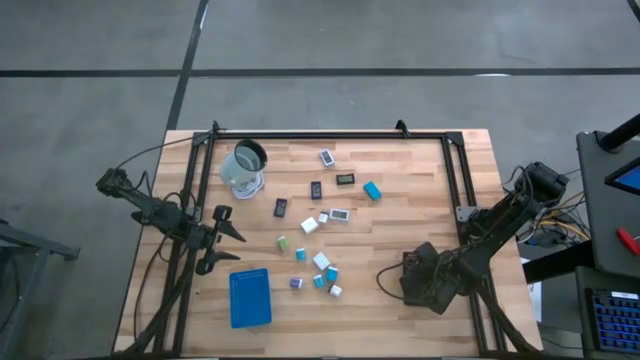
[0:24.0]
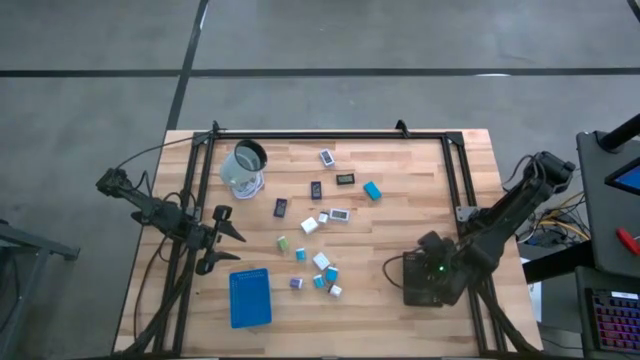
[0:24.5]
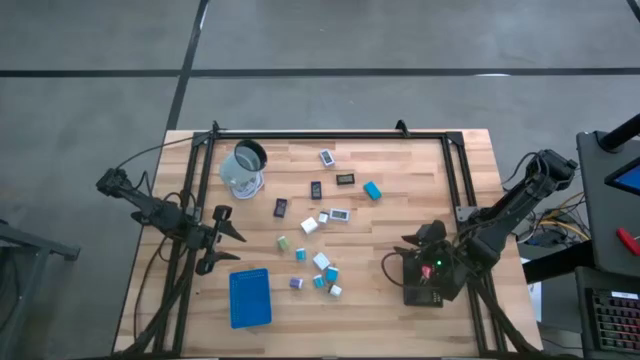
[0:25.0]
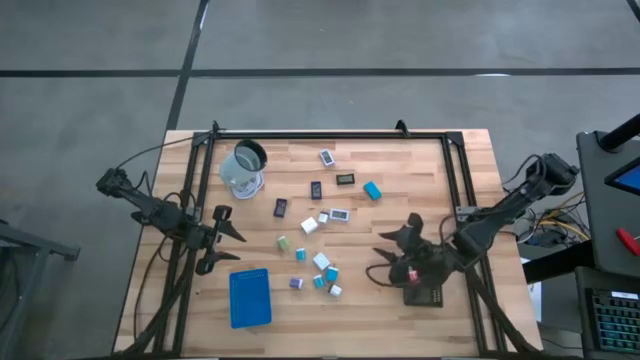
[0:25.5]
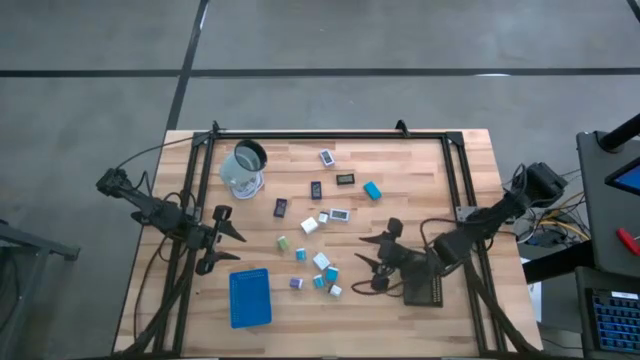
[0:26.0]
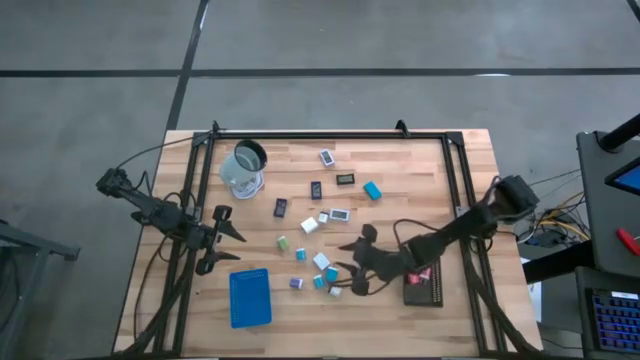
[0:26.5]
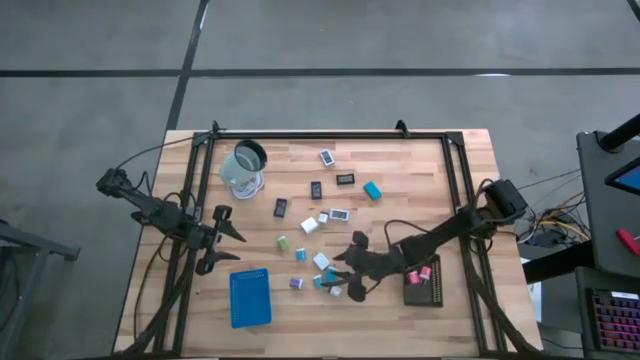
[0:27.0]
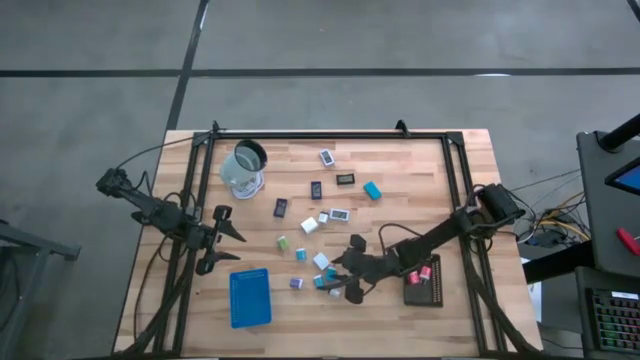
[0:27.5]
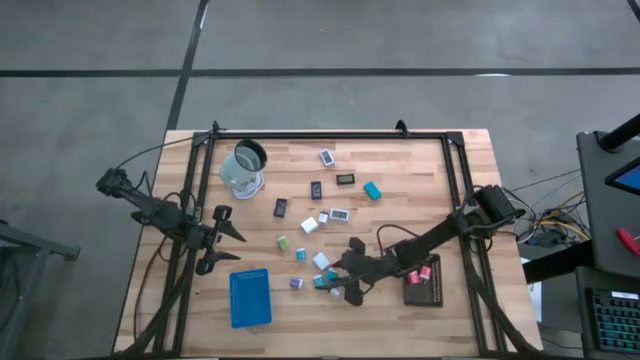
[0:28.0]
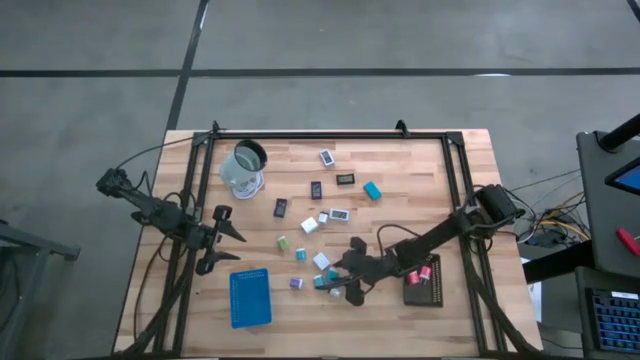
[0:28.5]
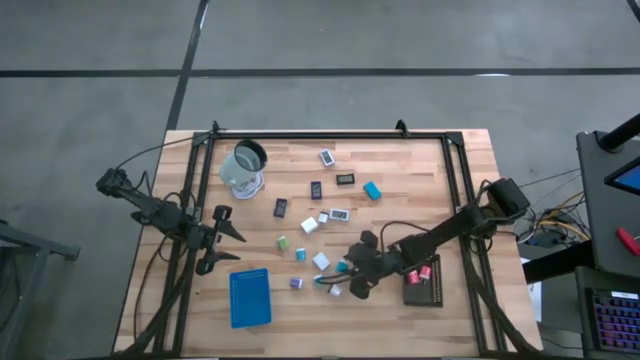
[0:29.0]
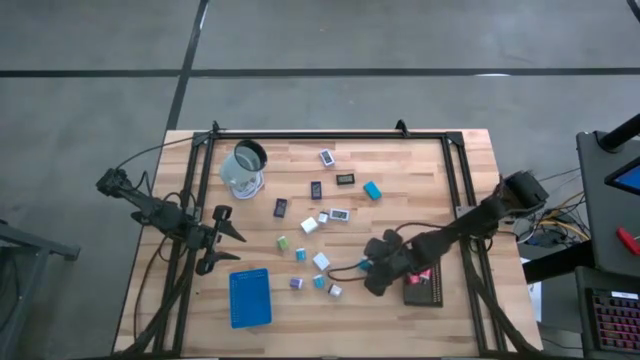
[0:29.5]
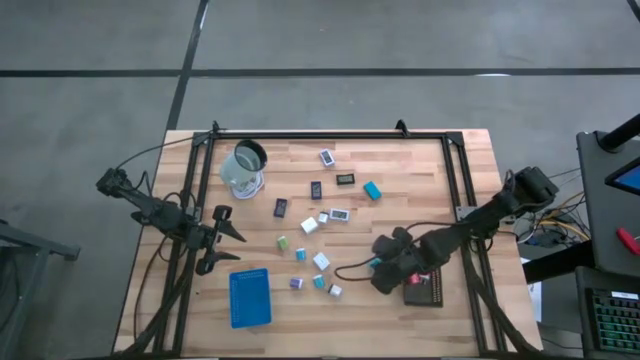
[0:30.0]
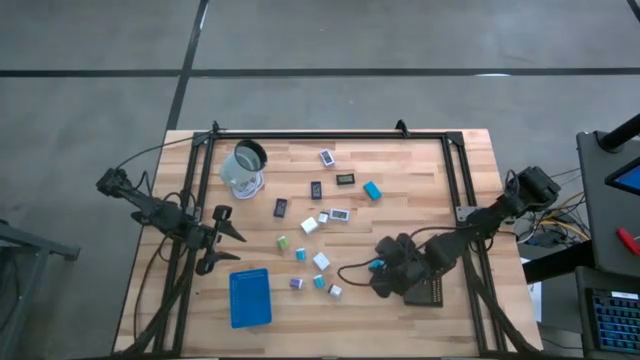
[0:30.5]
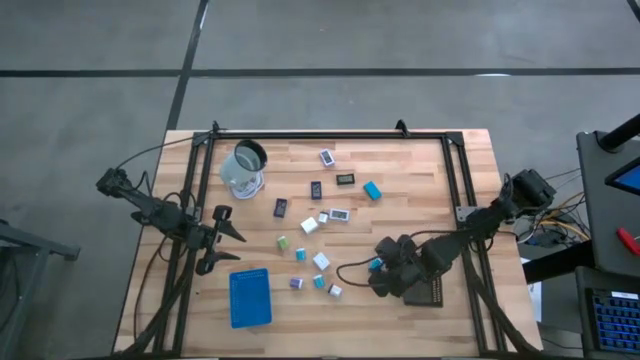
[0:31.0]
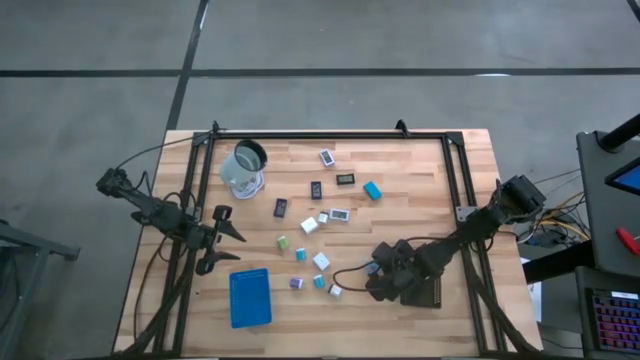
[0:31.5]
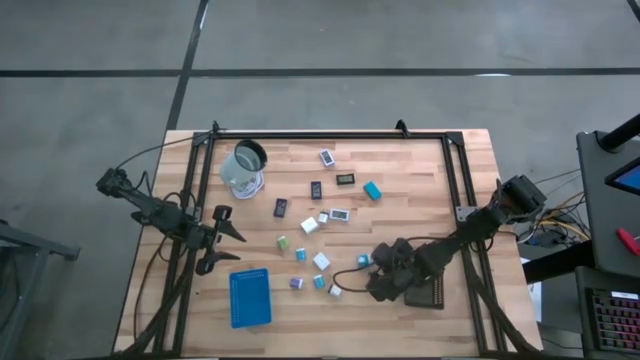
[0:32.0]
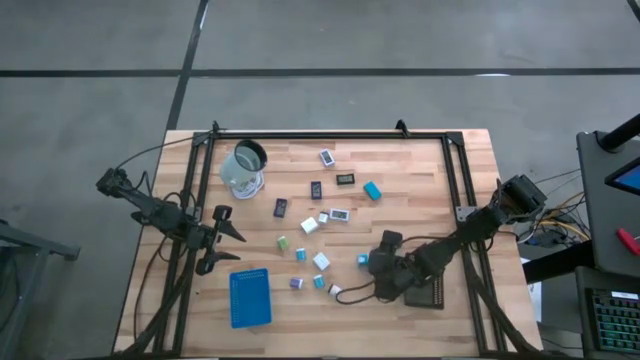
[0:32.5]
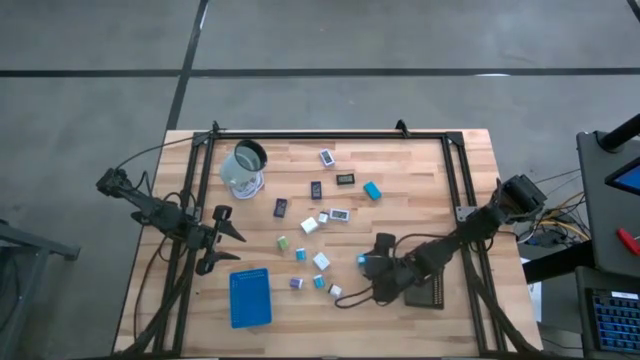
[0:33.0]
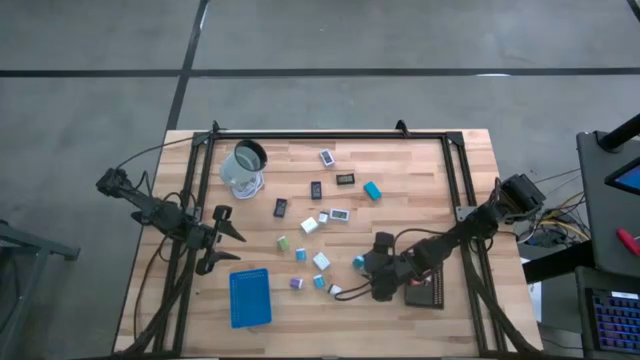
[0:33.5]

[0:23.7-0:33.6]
Task: Pick & Place Office items
Put the bottom right light blue charger adapter into the black bin

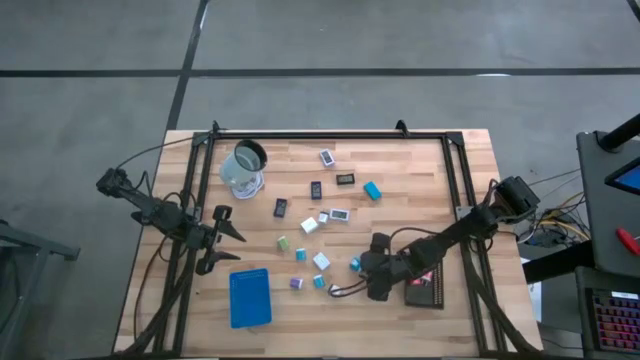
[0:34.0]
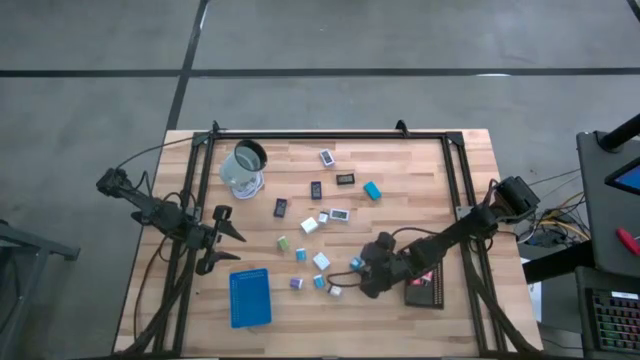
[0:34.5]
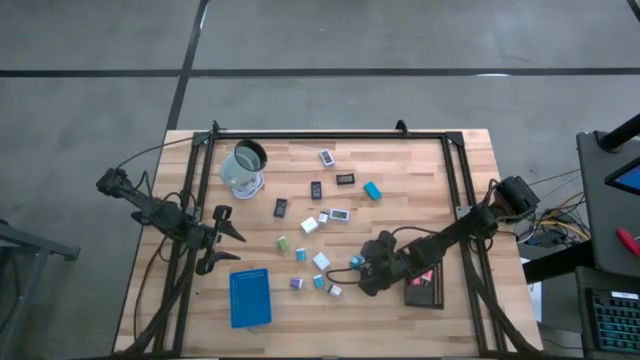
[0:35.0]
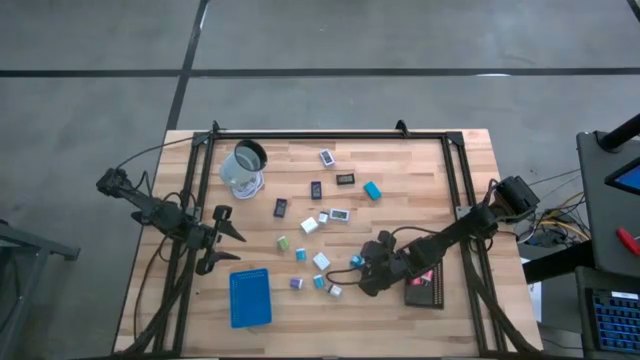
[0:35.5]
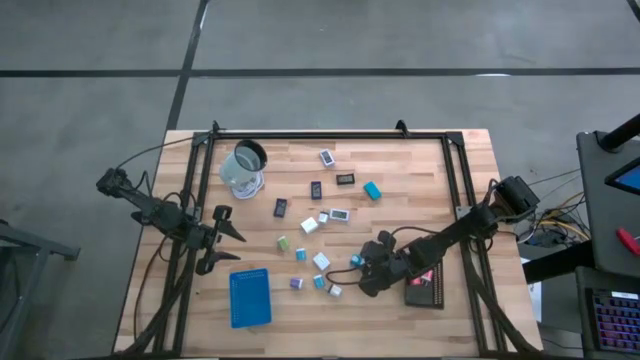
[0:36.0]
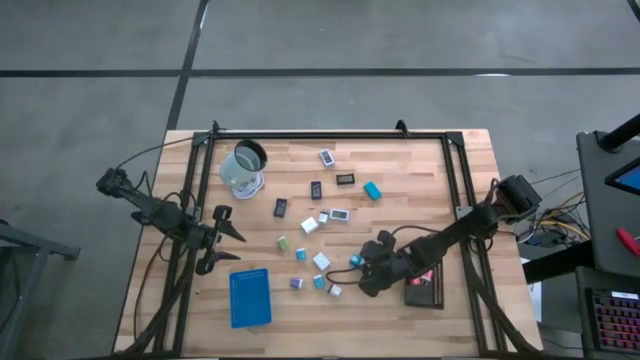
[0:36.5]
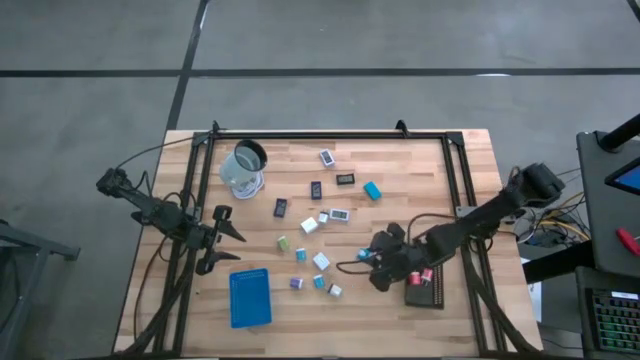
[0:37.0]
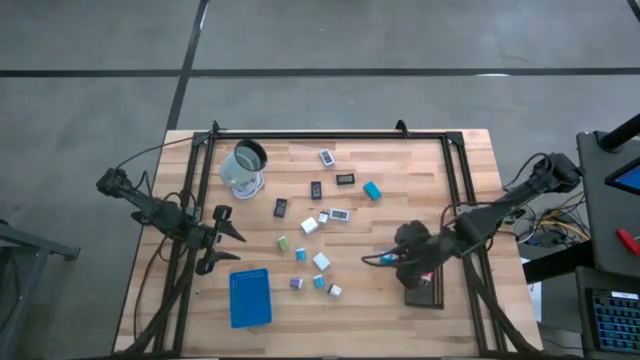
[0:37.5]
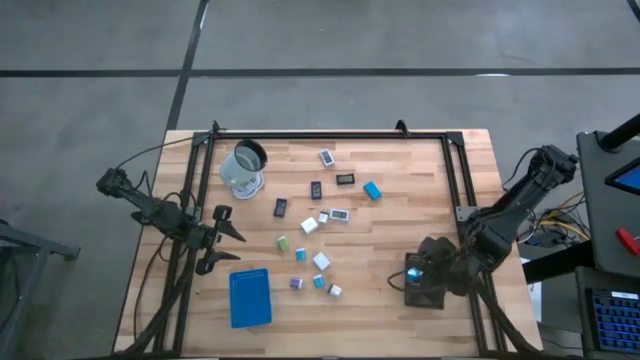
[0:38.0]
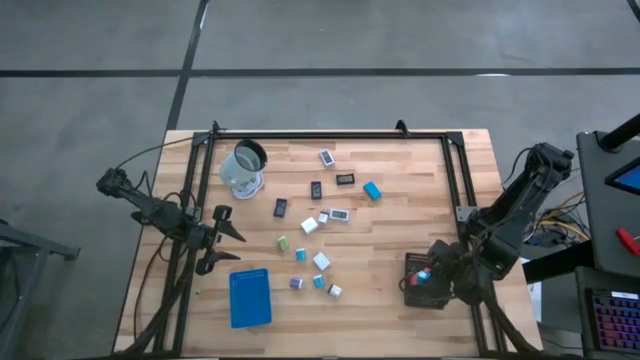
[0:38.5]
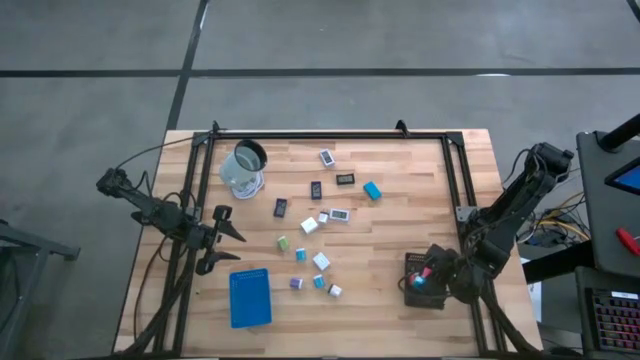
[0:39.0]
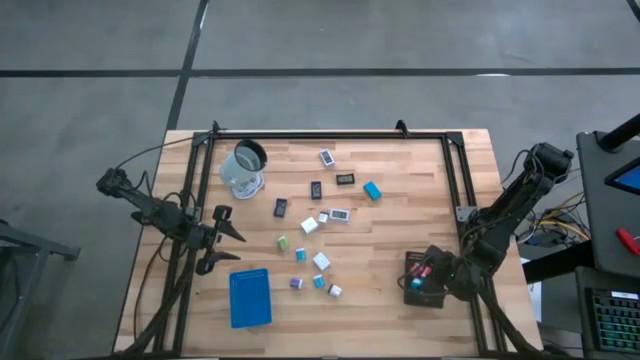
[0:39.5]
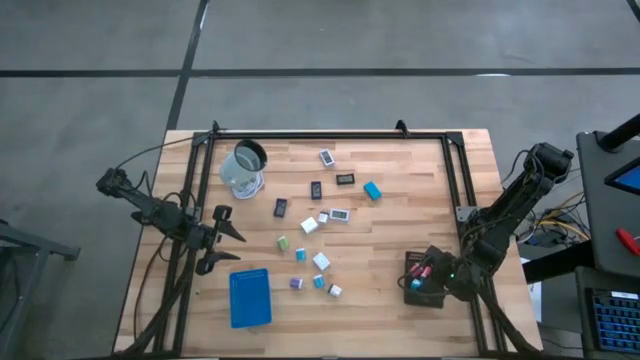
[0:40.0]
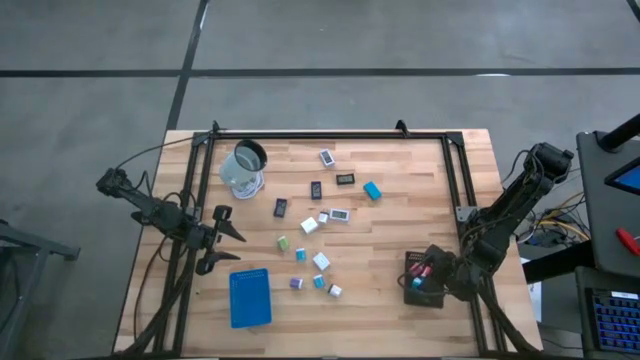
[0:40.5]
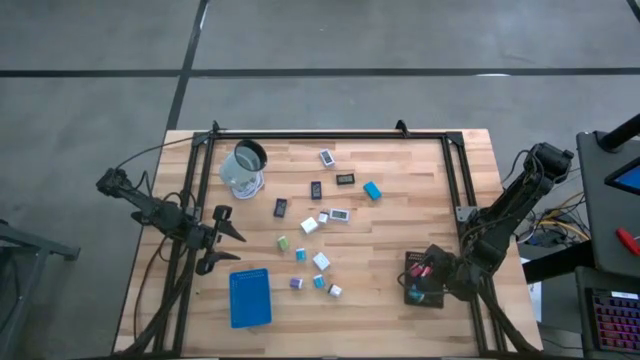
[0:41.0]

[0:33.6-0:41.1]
Put the bottom right light blue charger adapter into the black bin
